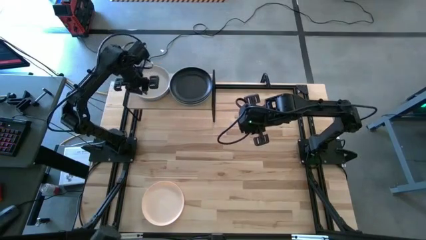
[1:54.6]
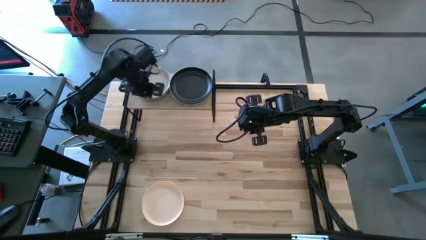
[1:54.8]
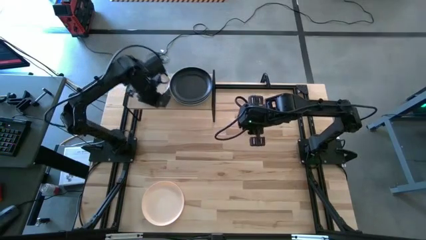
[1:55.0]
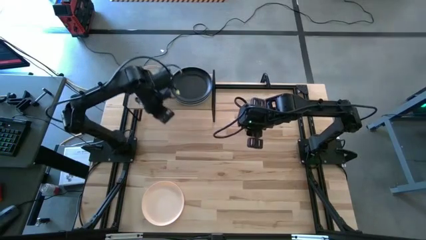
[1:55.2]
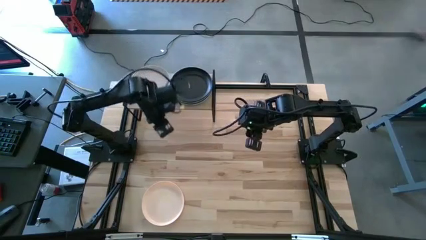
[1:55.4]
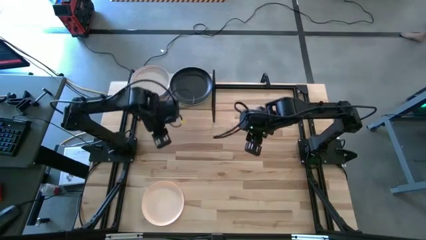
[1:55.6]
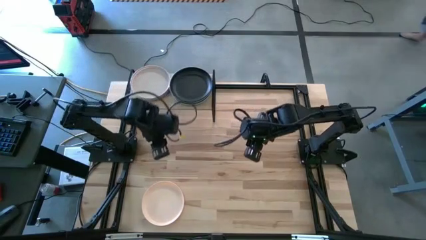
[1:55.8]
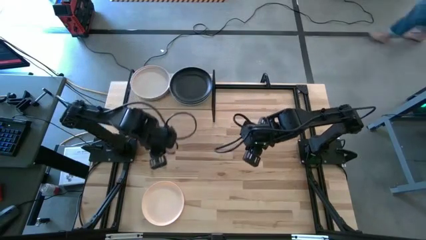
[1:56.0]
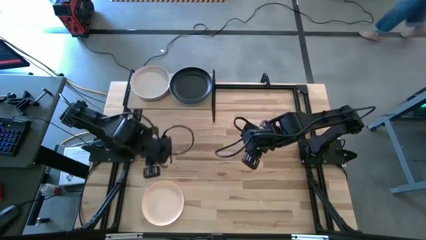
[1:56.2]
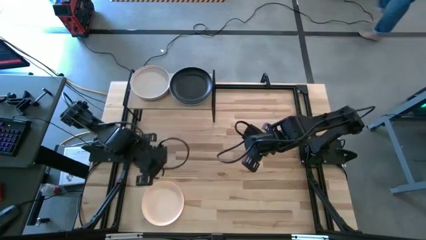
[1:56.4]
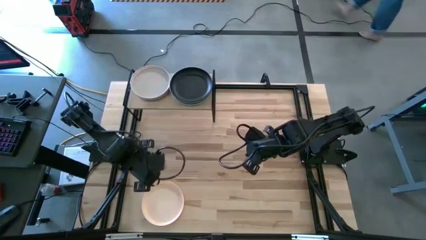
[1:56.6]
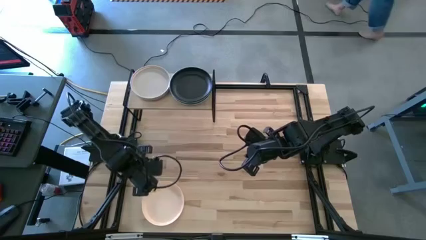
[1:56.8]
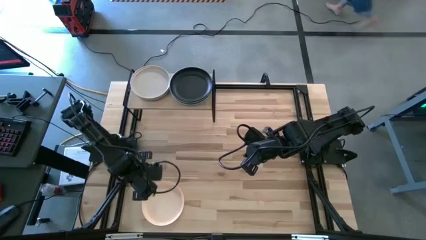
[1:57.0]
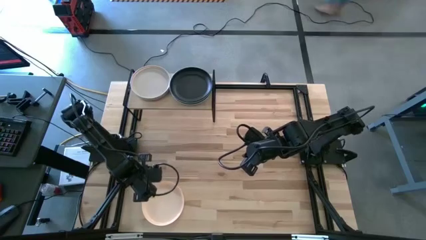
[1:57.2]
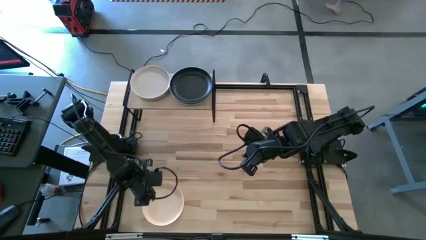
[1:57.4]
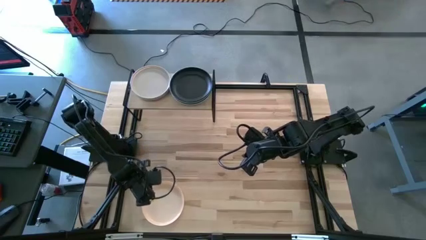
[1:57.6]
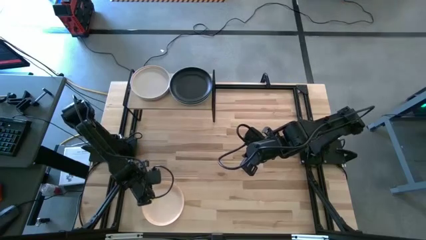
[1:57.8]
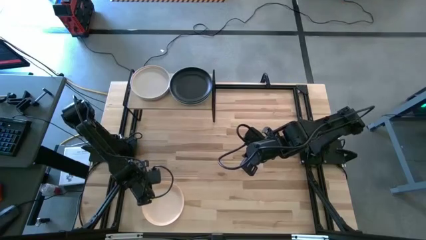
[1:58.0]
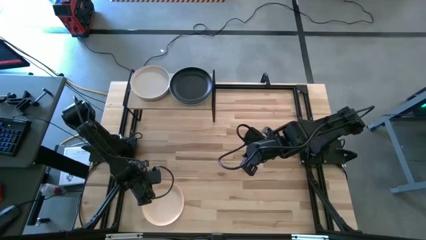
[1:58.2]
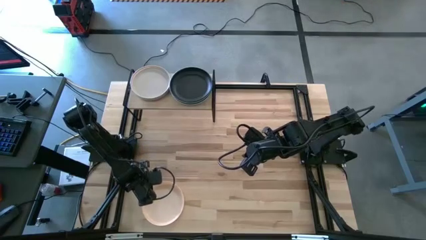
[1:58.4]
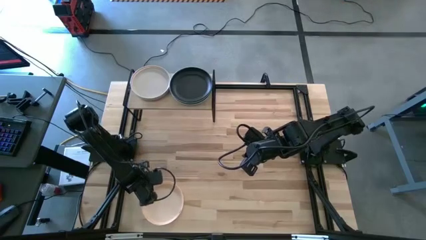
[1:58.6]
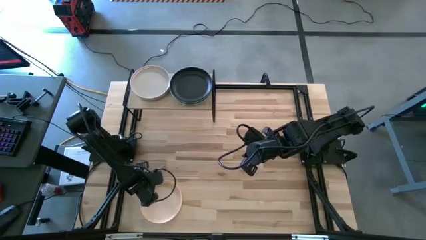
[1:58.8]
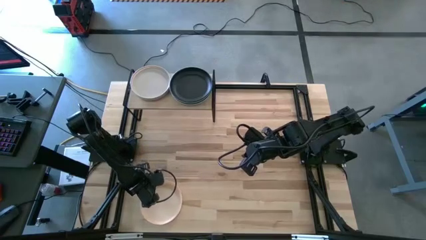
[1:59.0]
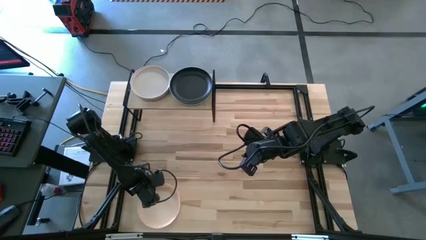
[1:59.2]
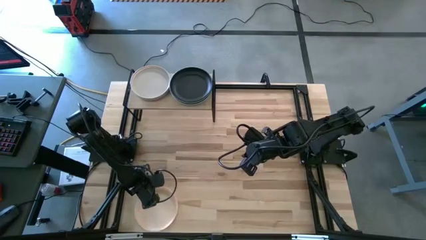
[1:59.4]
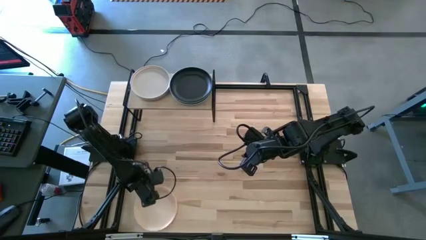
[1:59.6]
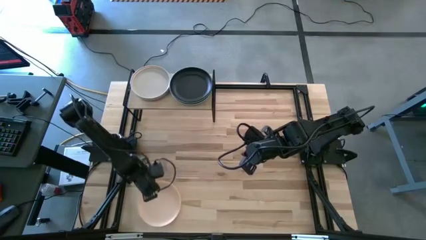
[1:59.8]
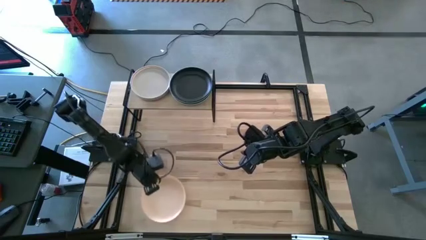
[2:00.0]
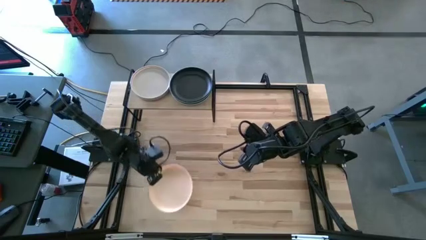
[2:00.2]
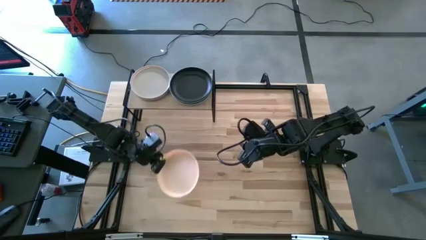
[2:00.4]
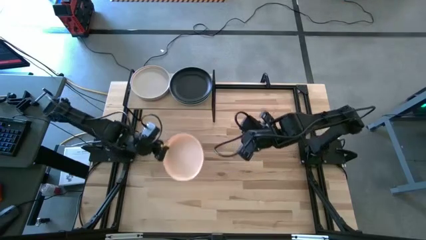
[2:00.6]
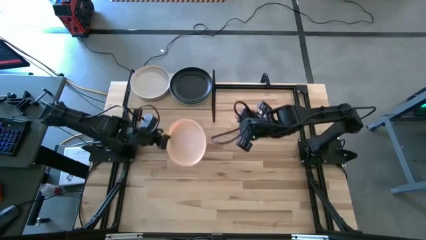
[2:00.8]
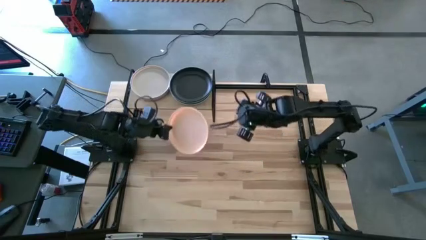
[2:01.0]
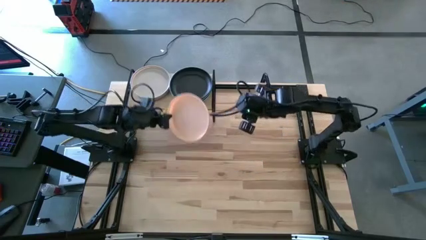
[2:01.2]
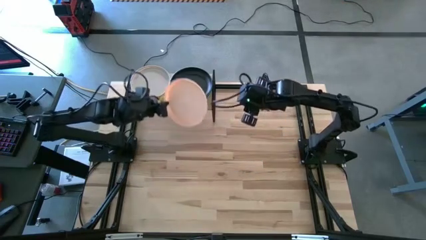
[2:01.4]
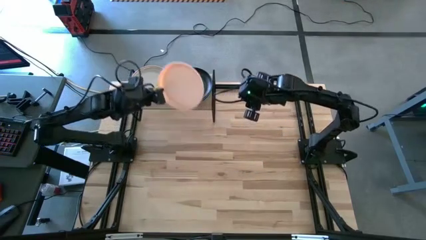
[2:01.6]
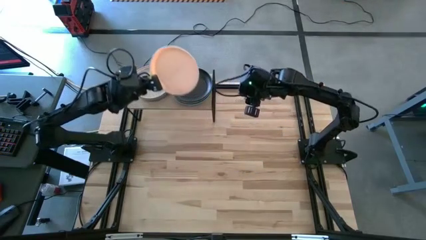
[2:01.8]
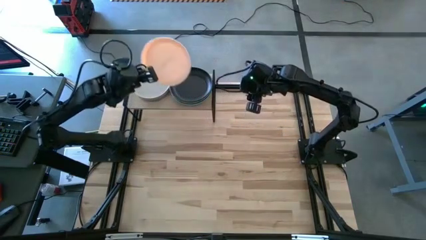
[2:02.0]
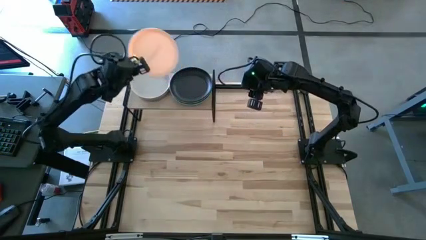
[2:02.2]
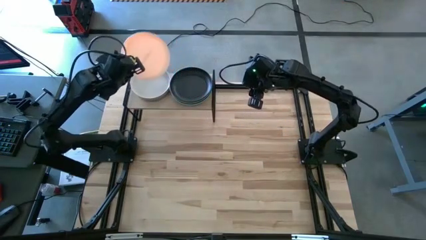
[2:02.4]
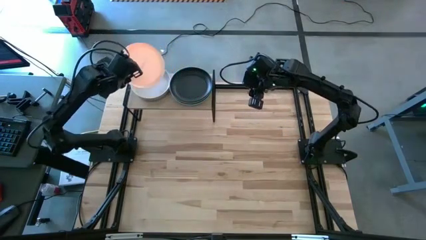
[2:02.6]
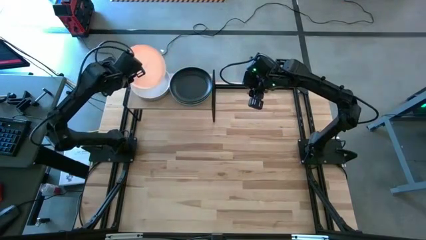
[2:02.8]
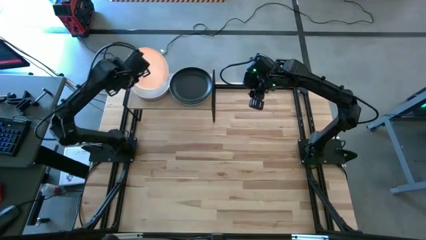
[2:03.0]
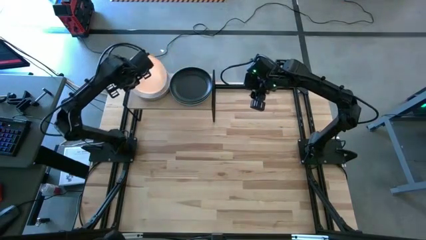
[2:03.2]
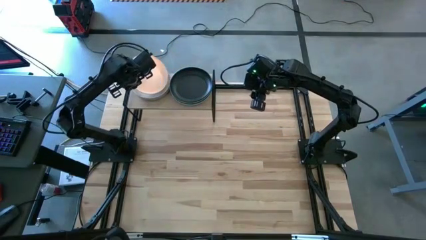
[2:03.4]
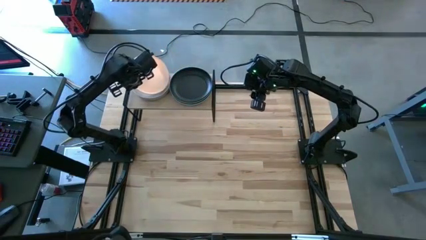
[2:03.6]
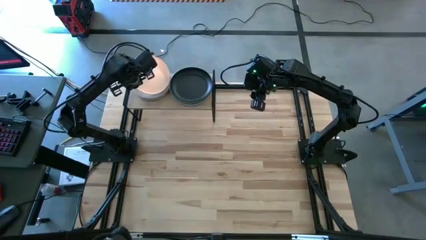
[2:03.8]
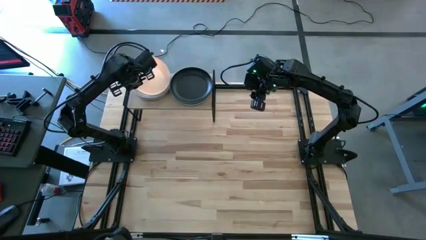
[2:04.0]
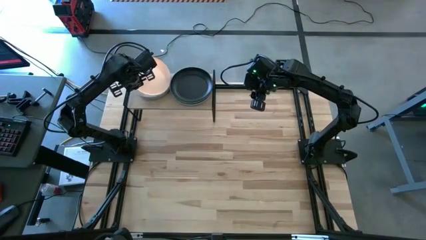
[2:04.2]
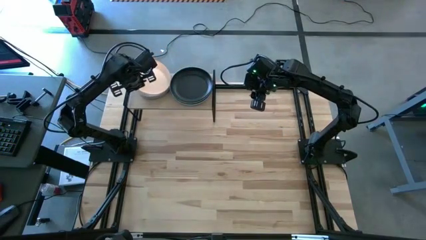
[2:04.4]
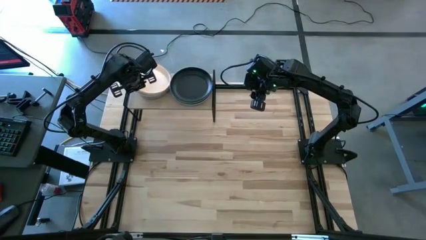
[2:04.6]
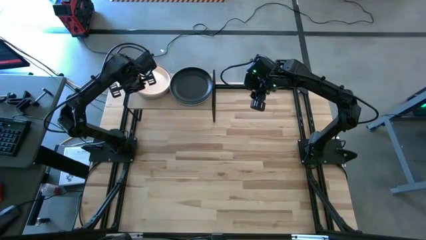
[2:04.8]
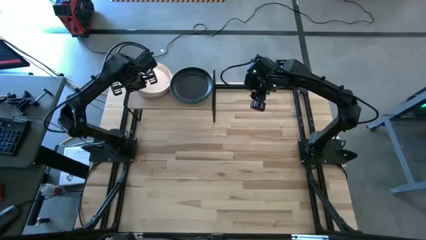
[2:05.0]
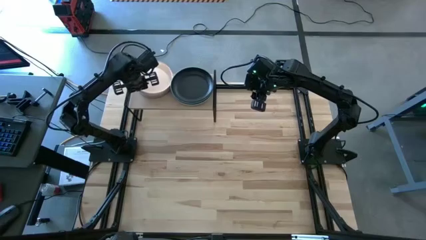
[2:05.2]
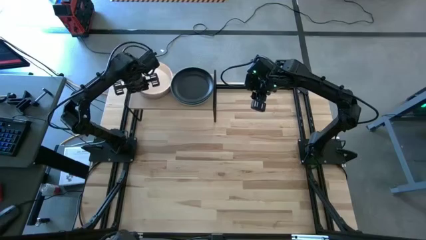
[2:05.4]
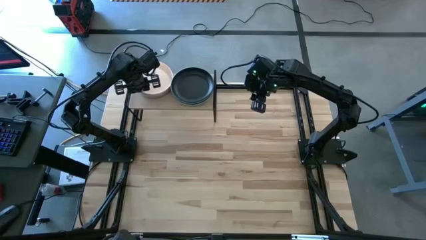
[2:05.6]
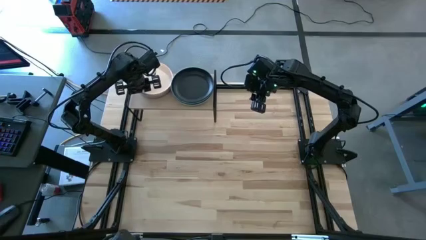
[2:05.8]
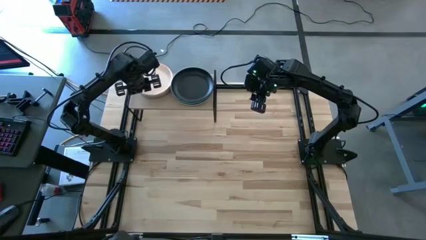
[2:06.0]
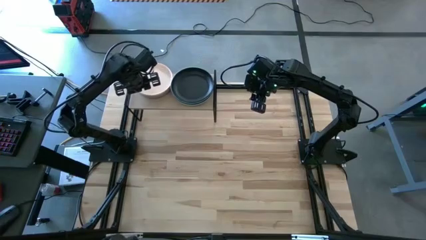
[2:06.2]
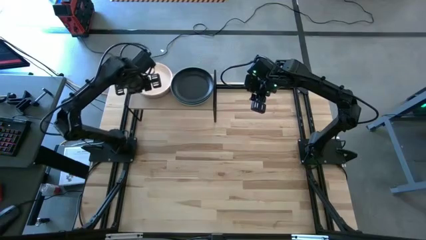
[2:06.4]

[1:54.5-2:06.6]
Task: Place and stack plates onto a shelf
Stack the light orange plate on top of the gray plate on the shelf

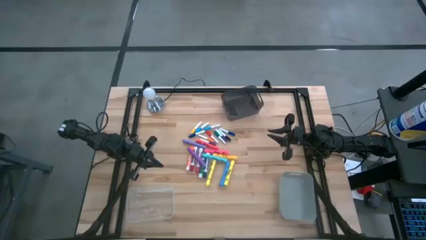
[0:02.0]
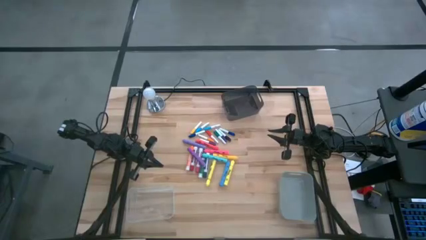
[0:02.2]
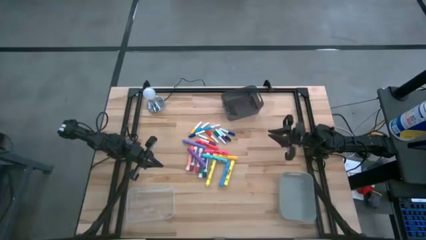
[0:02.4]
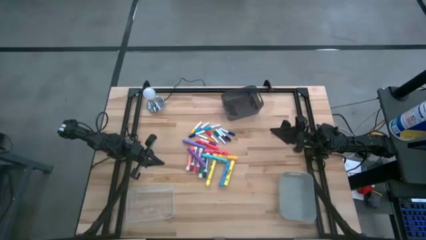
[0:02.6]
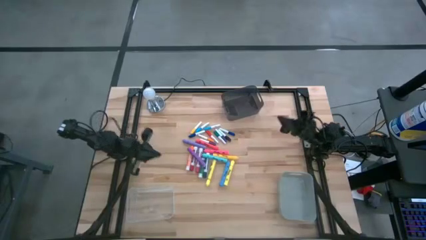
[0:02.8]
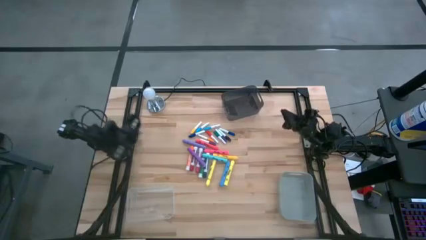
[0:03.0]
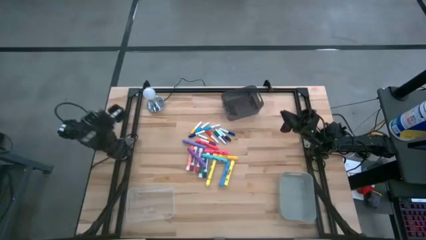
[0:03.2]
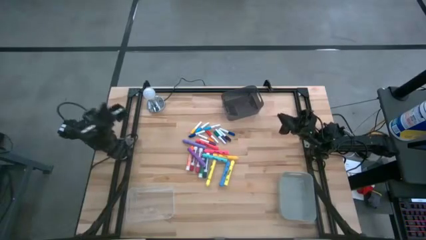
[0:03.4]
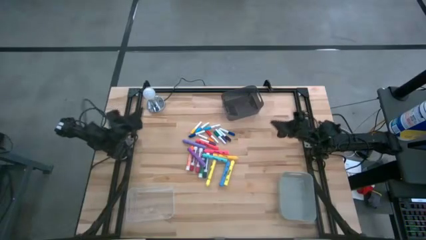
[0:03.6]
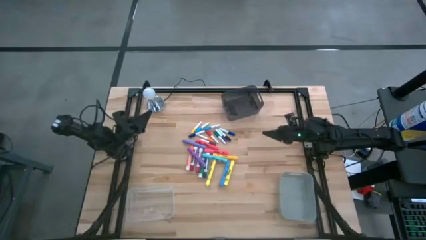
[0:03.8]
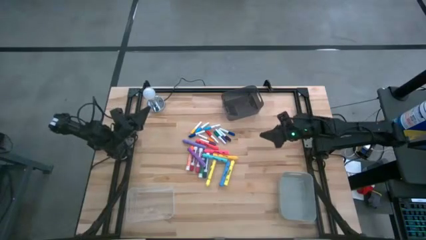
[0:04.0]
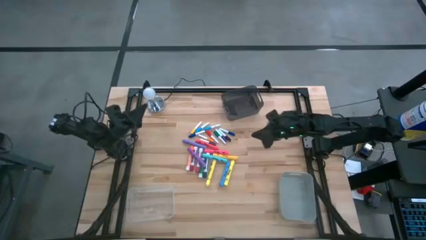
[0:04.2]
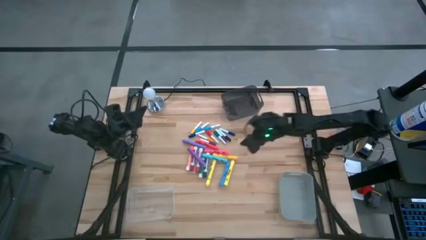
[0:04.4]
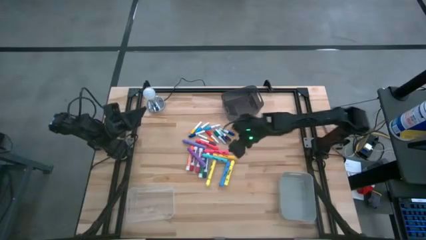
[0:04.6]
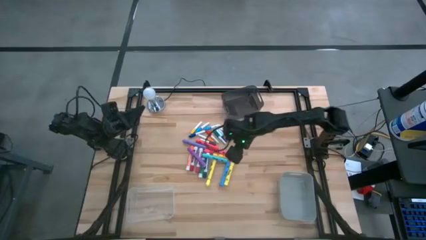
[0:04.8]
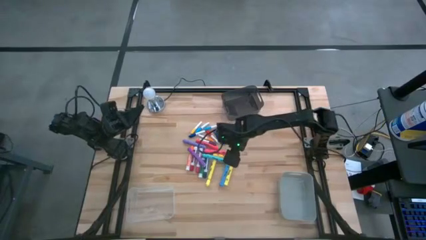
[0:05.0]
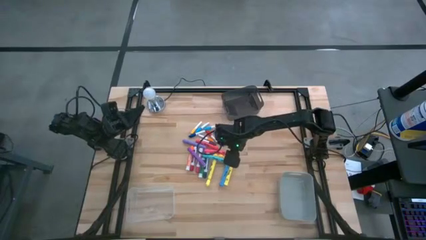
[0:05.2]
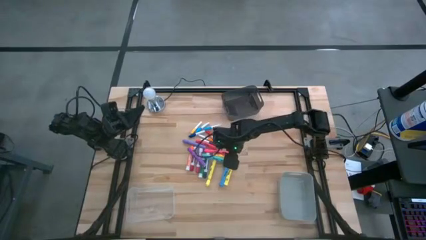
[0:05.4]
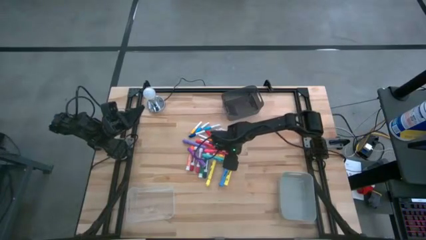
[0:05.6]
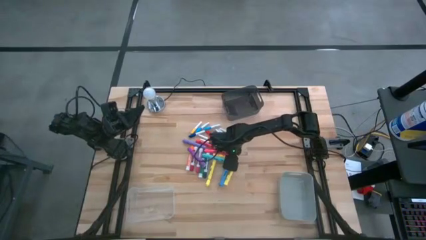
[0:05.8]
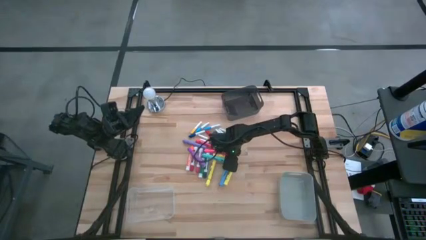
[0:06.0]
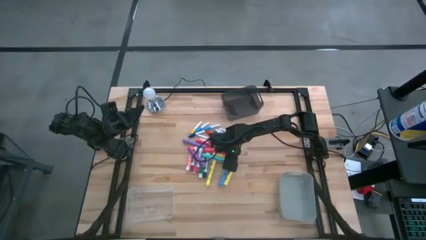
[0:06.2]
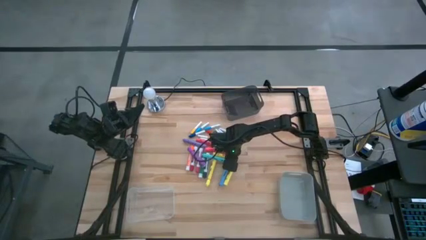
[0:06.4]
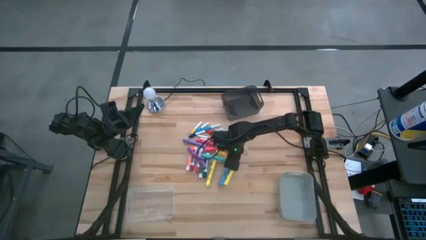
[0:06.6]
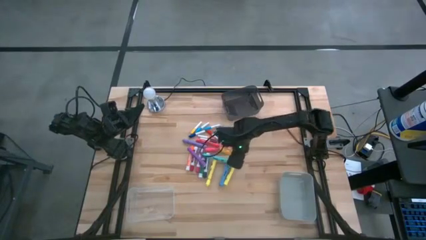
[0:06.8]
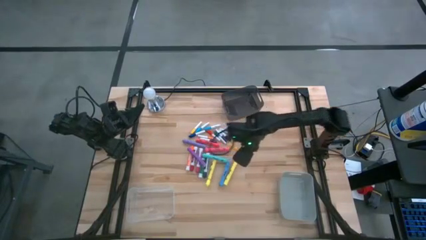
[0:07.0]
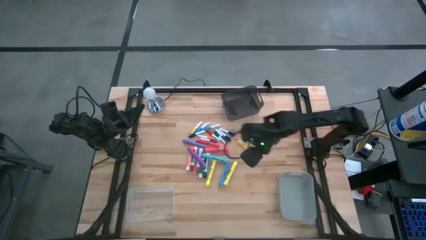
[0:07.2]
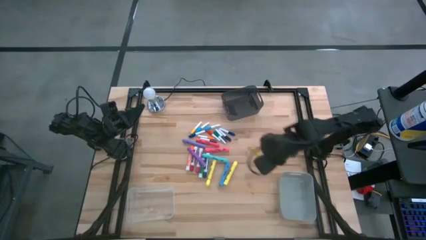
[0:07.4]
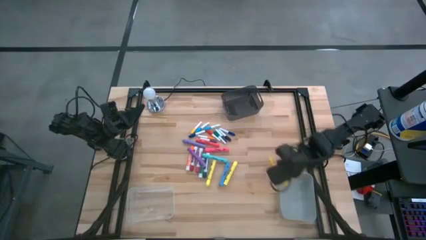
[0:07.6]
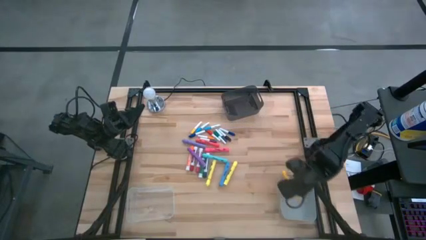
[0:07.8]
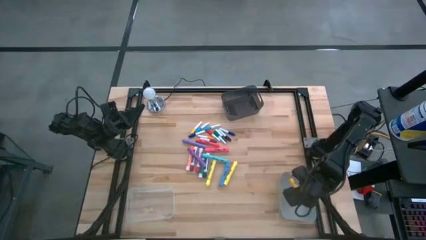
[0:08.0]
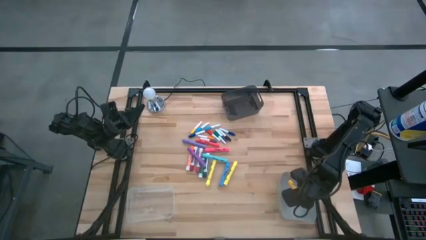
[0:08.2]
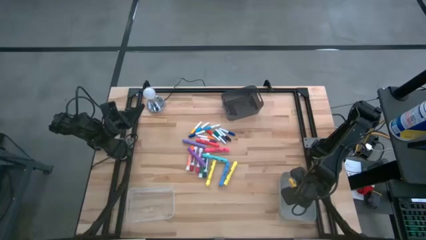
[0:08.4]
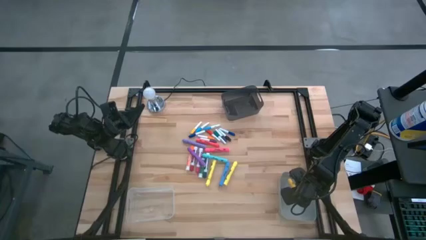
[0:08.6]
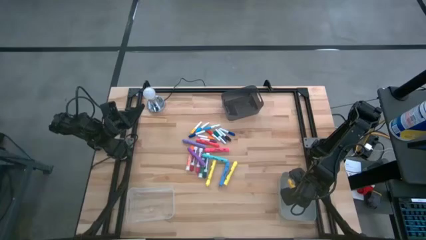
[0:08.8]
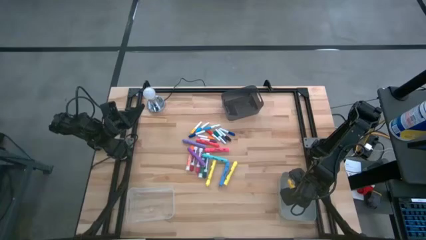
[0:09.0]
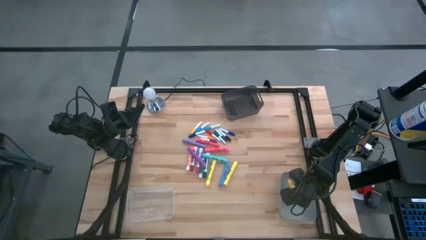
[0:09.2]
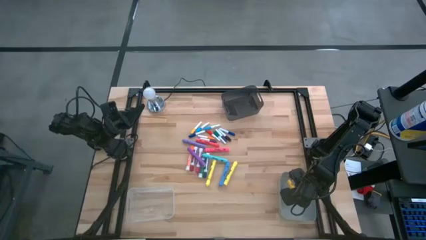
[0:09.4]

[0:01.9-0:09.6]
Task: Pick & Place Markers
Put the yellow highlighter pen into the gray bin
